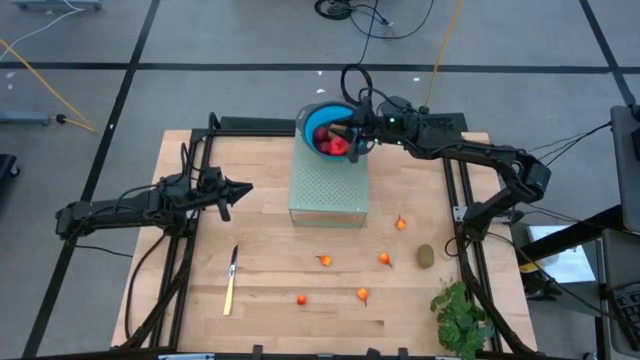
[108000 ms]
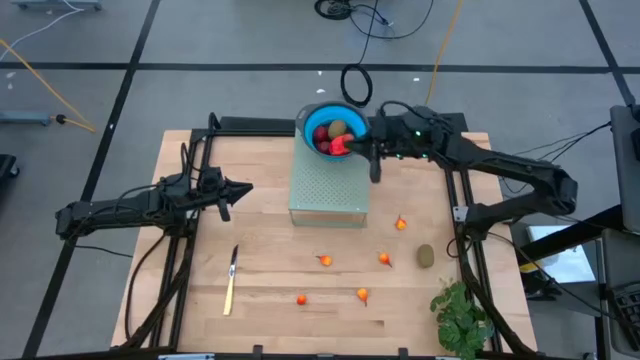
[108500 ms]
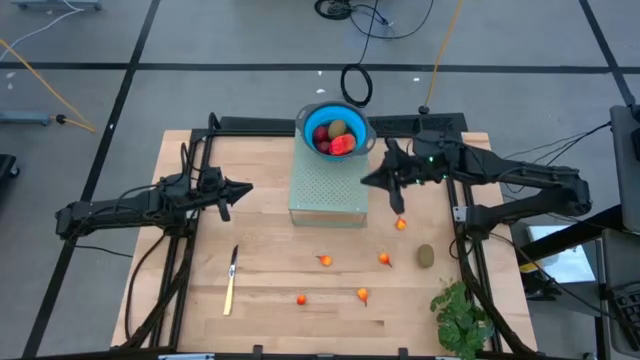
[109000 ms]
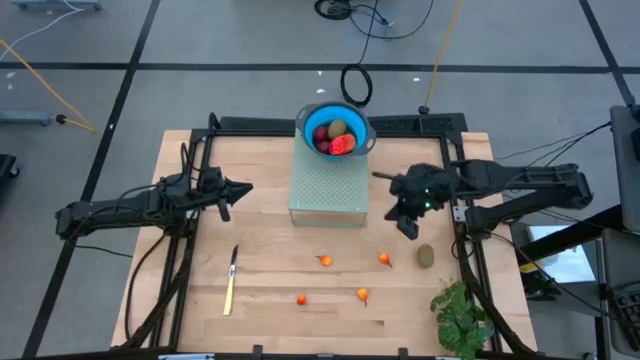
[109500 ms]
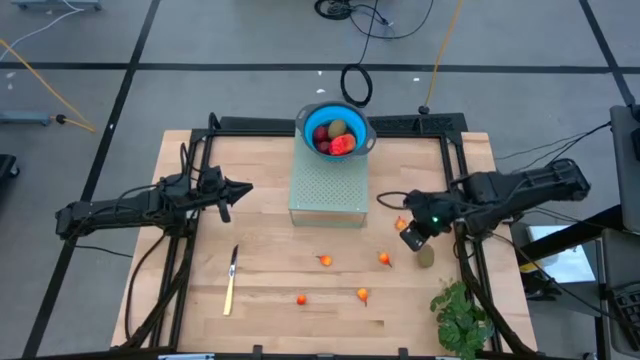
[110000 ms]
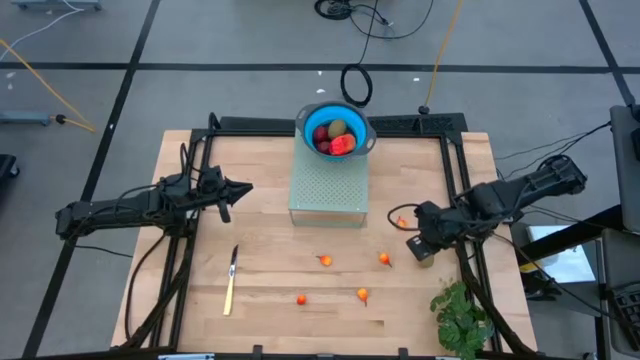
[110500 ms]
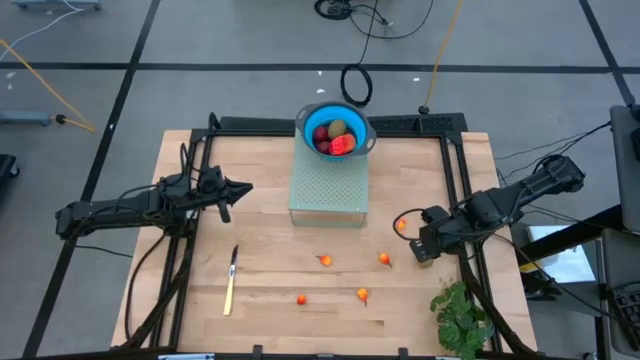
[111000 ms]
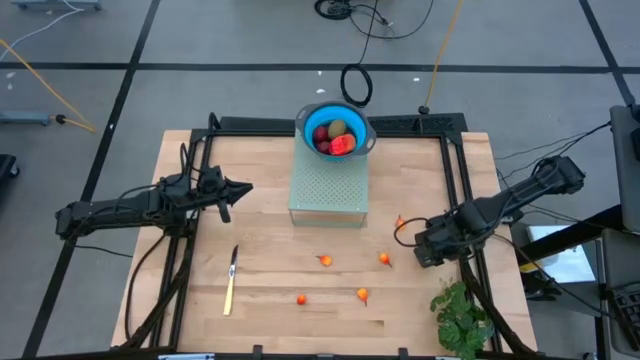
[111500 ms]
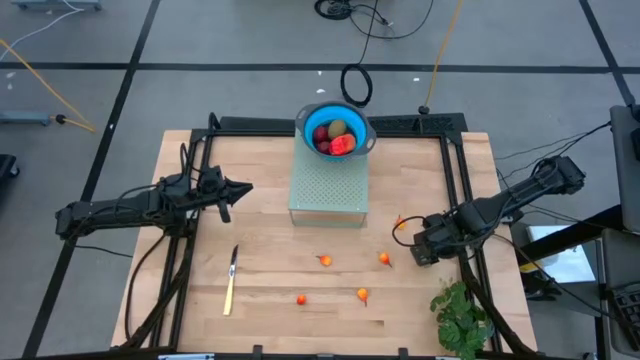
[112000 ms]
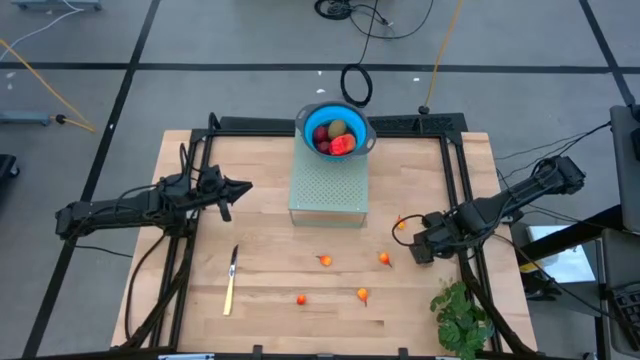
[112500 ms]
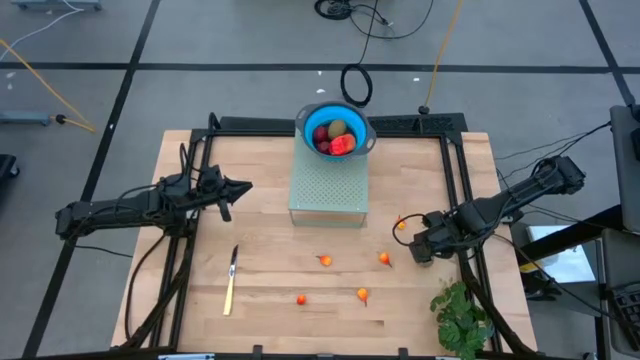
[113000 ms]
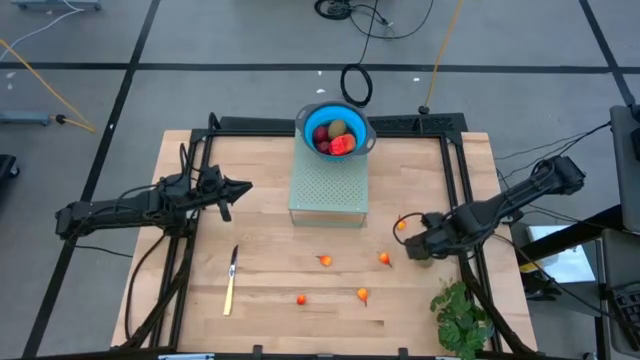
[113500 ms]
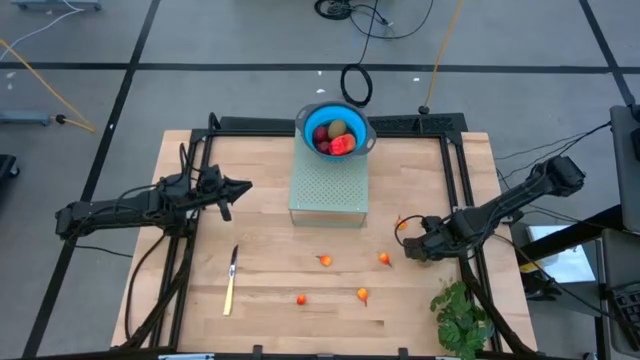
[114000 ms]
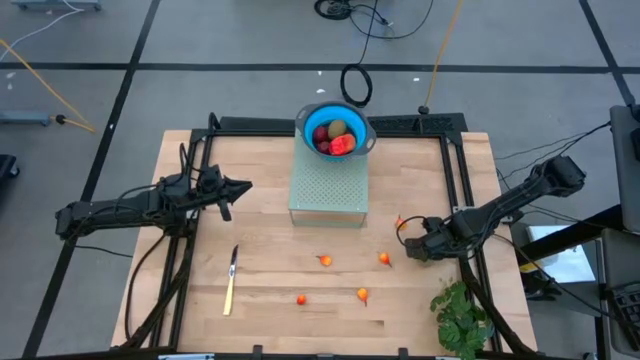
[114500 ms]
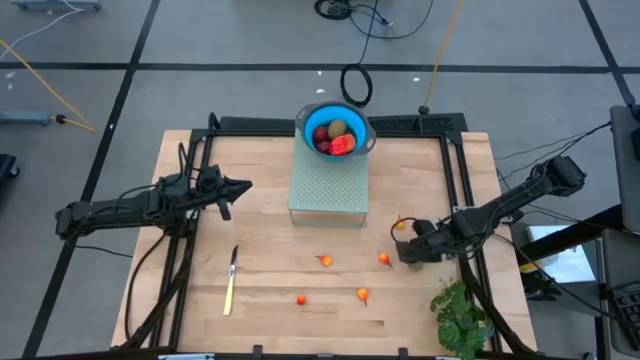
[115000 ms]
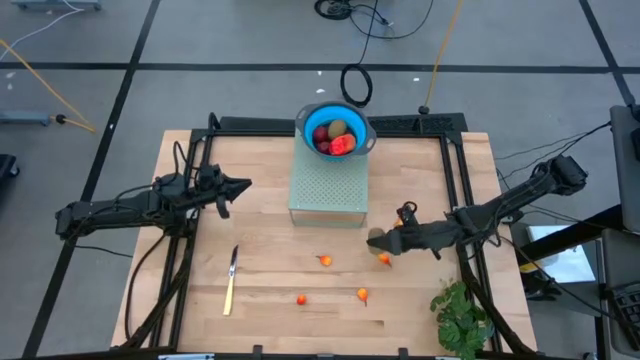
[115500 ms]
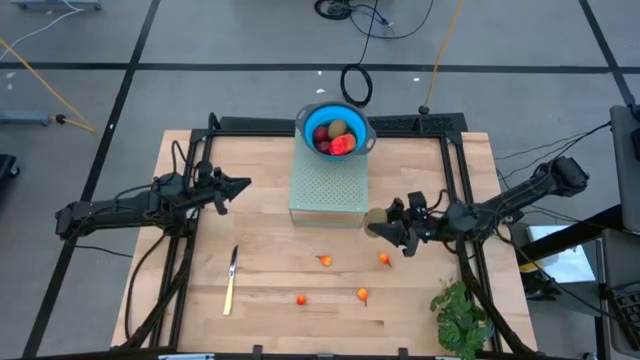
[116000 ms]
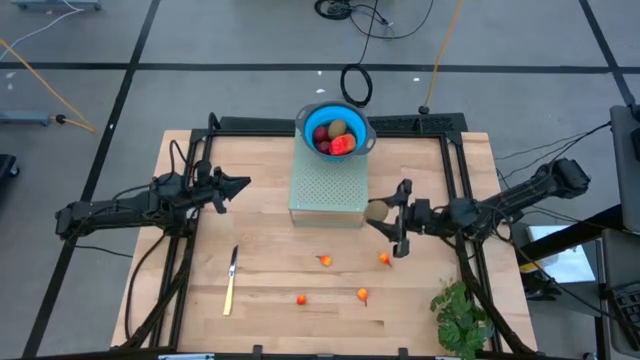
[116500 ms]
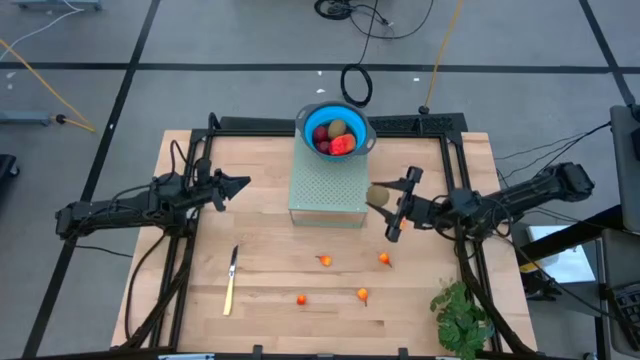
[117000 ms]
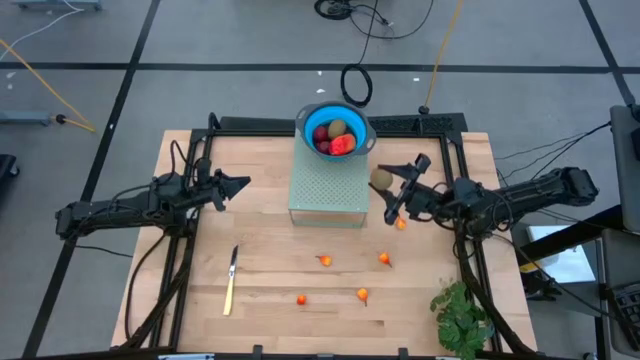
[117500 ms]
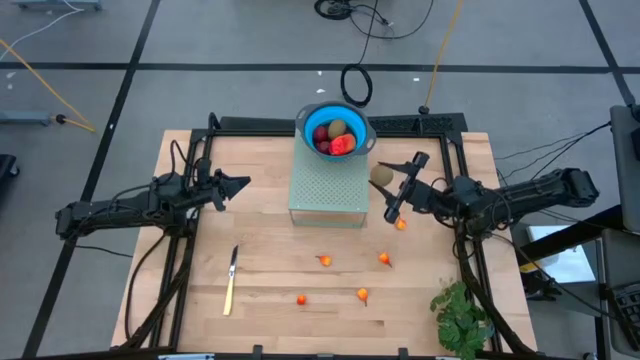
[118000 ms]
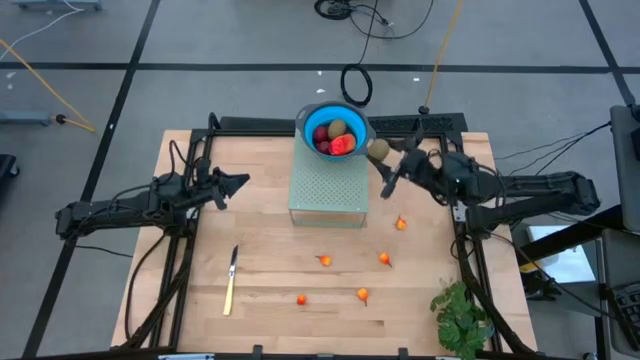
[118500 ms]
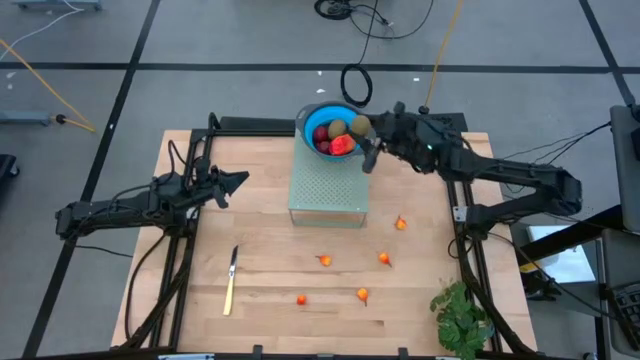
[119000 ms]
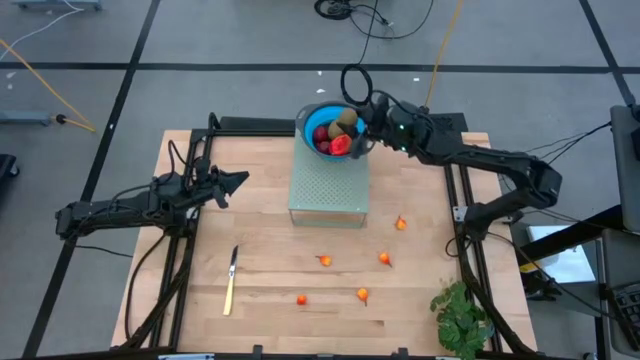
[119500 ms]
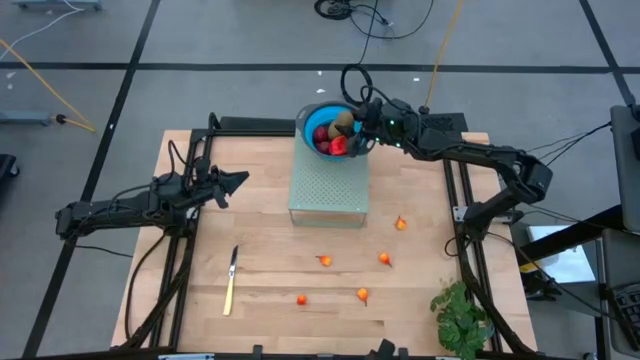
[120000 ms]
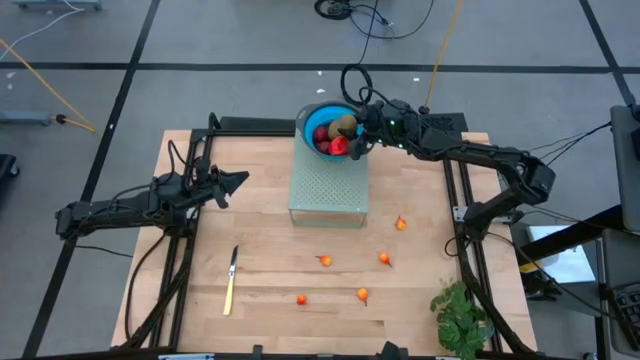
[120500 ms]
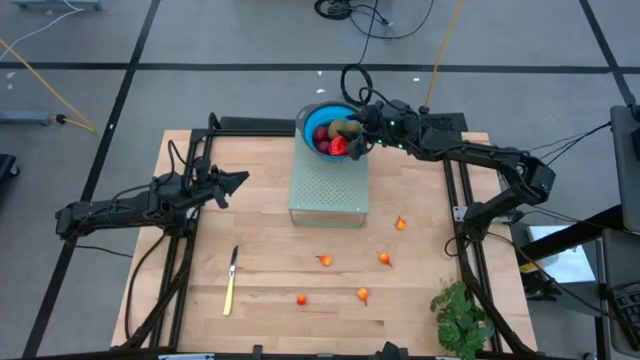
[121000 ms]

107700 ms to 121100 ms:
Task: Pick & Place Fruit
Put the brown kiwi into the blue strainer bowl on the shelf

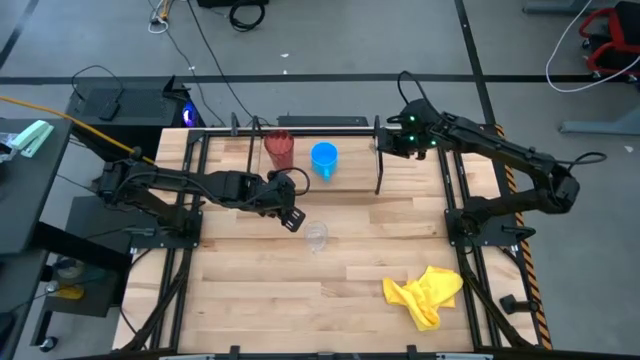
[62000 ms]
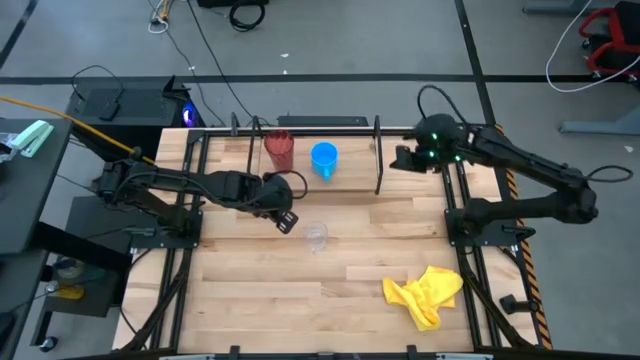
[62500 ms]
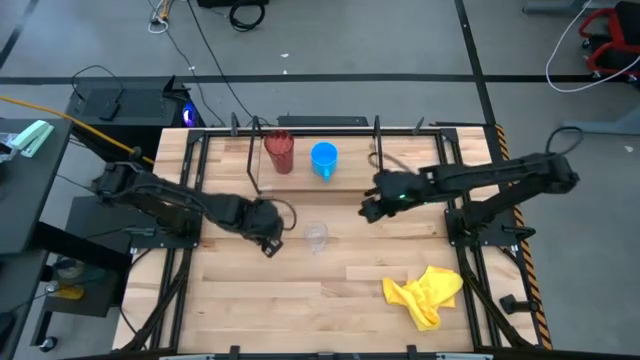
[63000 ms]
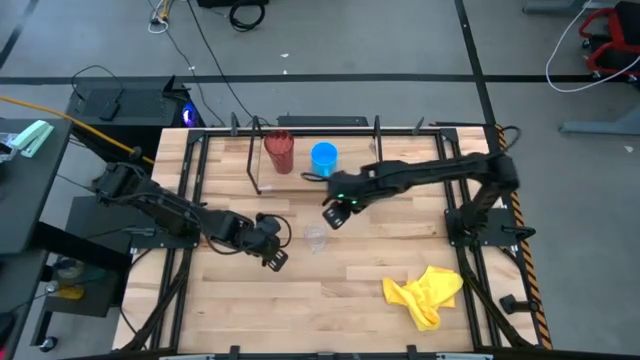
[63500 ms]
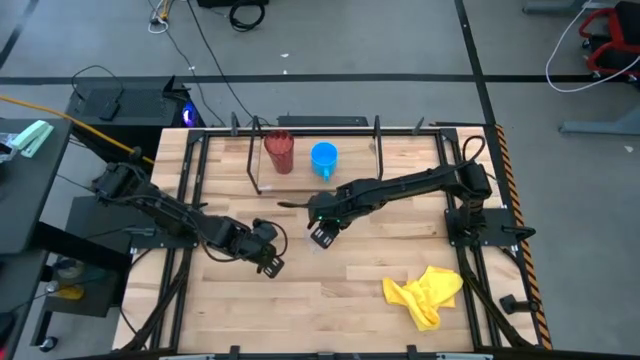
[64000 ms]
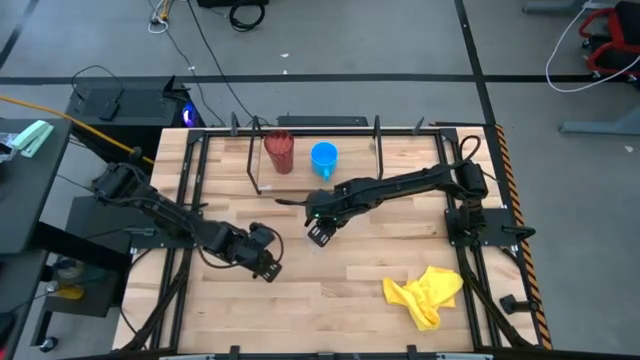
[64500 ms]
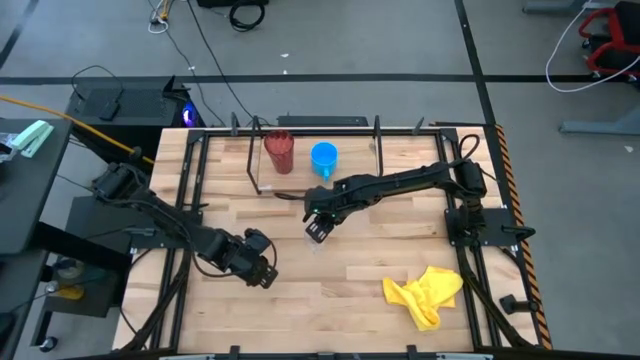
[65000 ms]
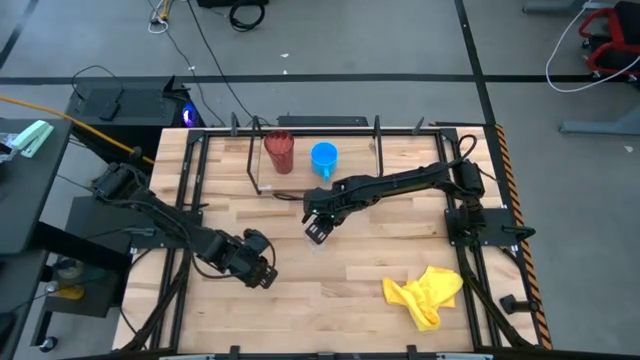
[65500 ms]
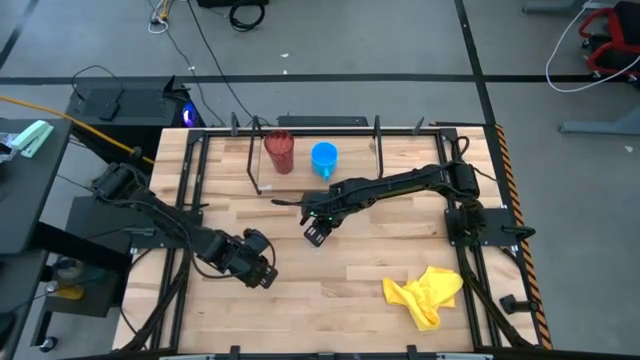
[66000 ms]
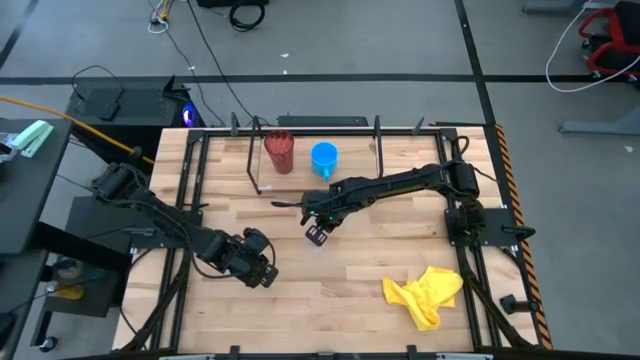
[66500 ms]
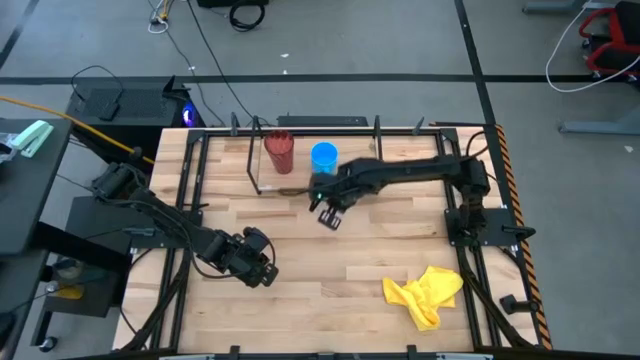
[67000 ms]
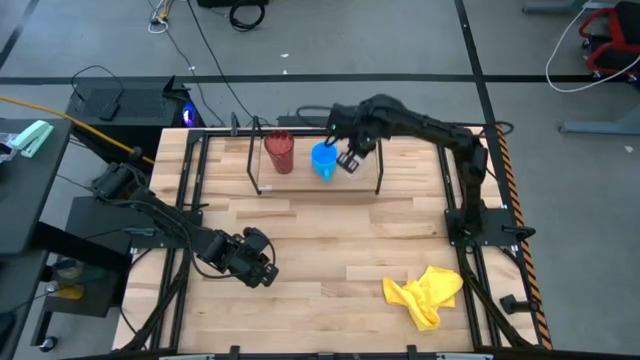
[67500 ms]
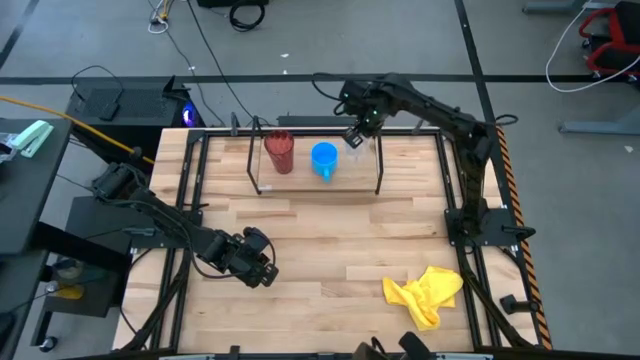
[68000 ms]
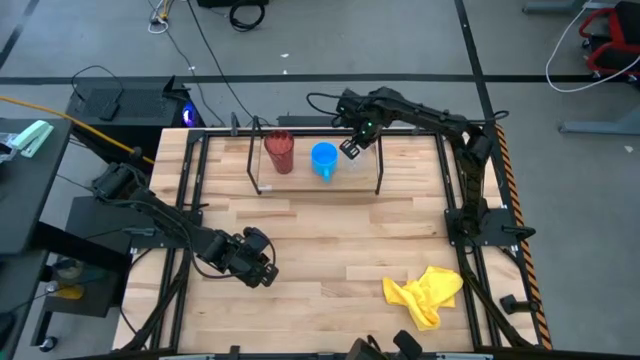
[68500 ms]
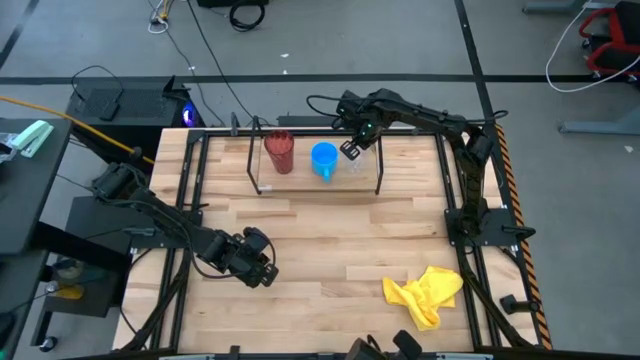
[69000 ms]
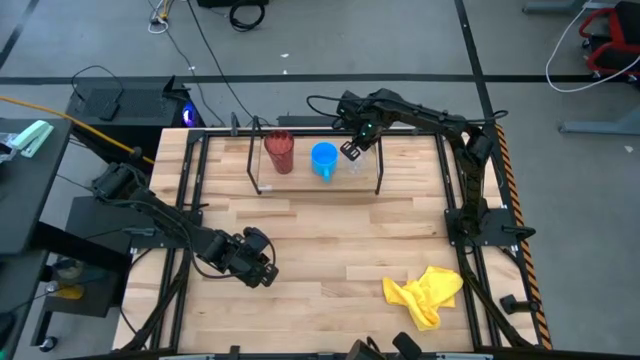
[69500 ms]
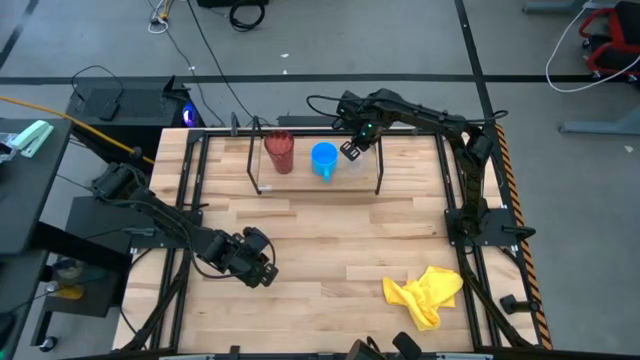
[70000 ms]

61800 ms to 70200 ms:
Task: Stack small to large cups/mugs on shelf
Put the transparent mug on the shelf
